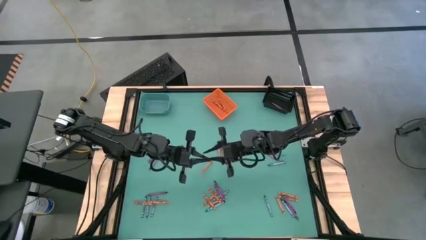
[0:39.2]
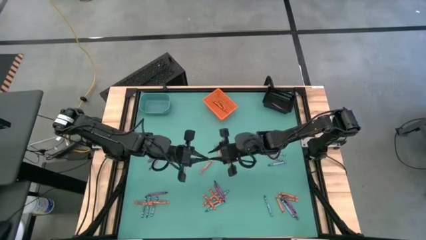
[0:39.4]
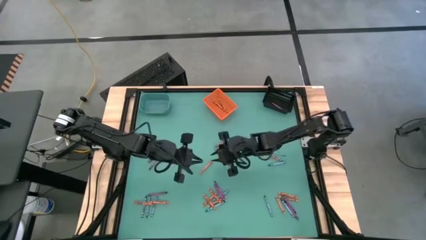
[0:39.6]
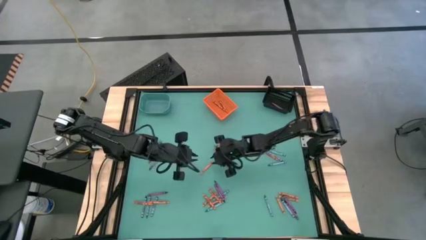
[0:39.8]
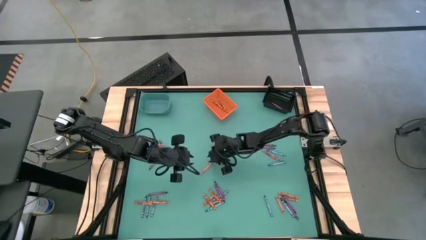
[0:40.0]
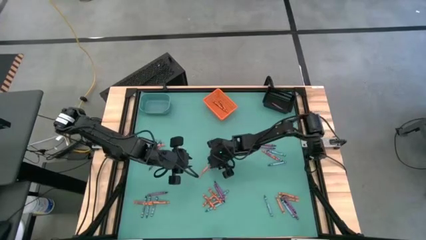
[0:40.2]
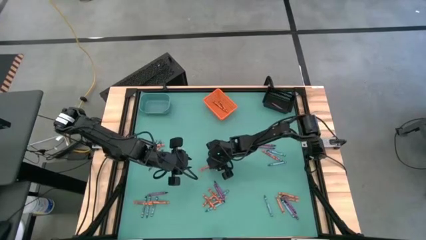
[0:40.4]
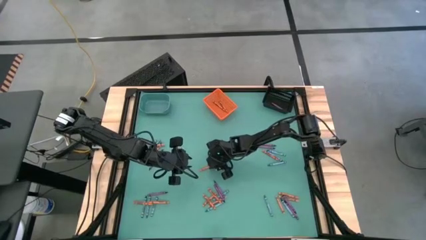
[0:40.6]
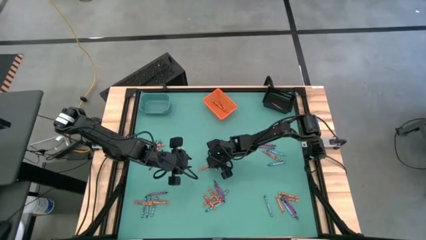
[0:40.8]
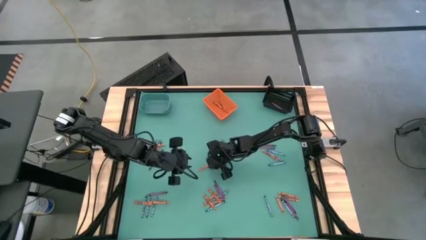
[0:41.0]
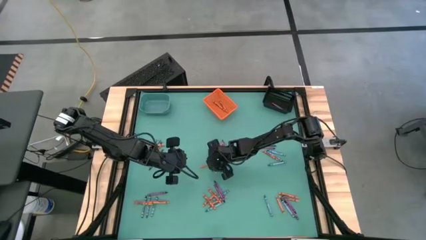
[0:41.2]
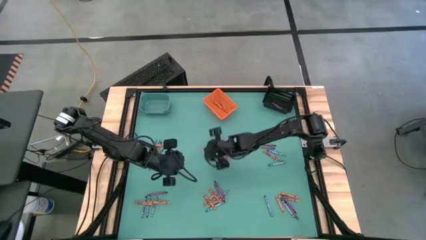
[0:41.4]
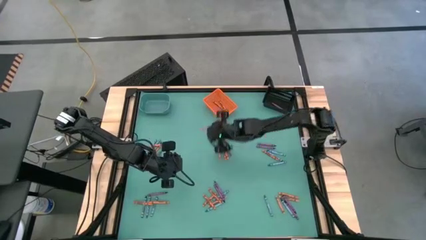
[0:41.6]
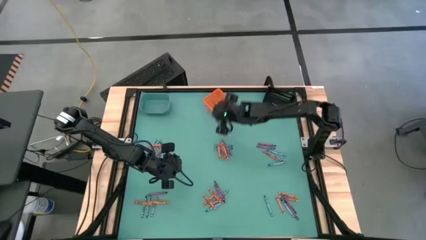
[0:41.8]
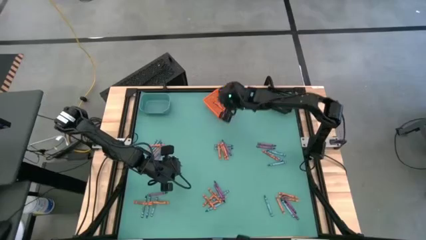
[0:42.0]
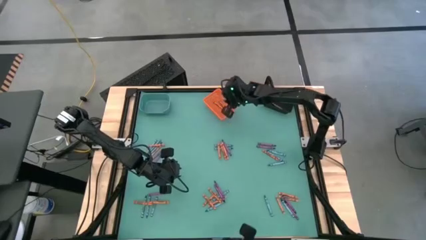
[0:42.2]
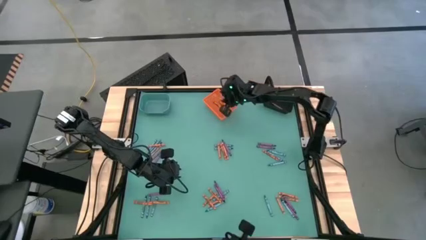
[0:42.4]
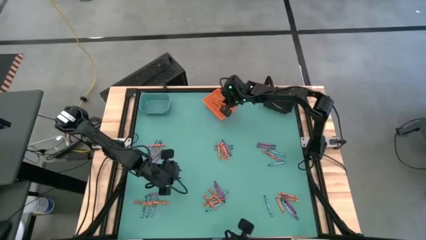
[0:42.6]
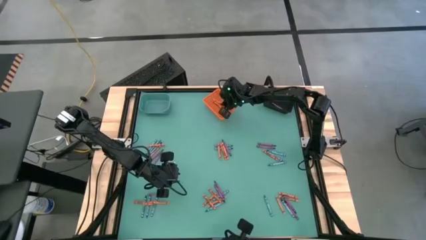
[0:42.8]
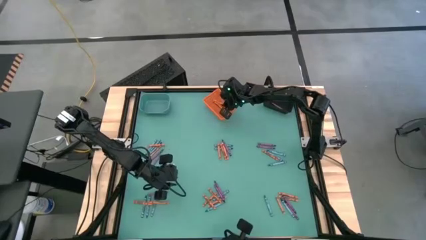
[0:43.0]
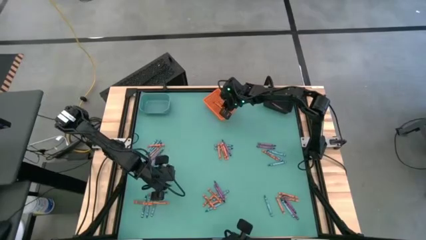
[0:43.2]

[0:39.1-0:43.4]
Task: Sort crayons
Put the crayon into the orange bin

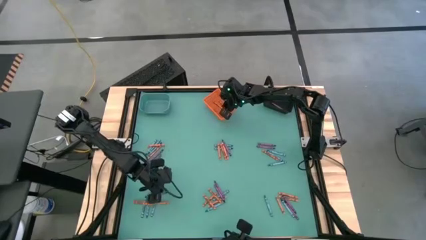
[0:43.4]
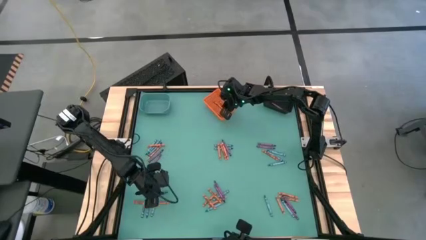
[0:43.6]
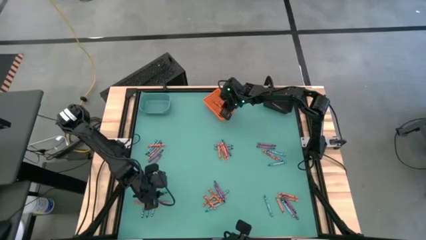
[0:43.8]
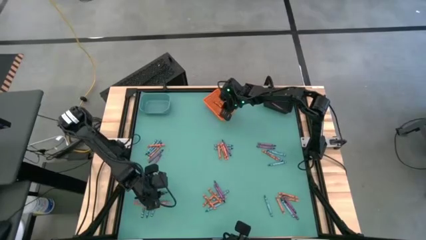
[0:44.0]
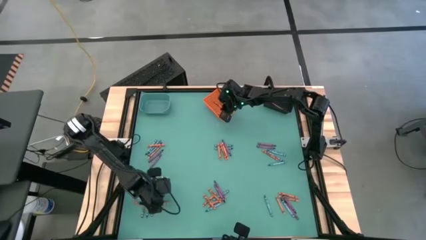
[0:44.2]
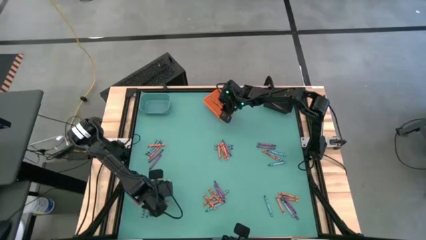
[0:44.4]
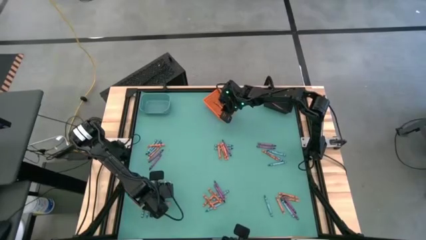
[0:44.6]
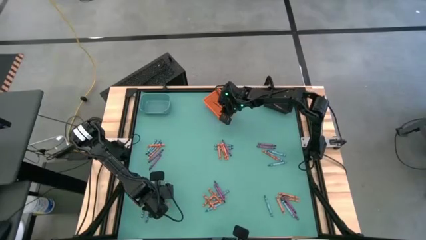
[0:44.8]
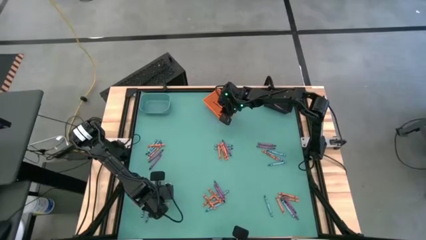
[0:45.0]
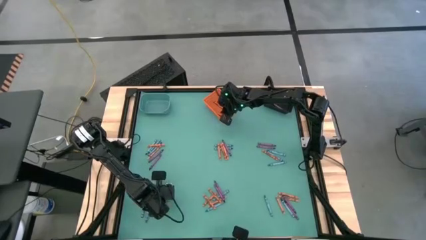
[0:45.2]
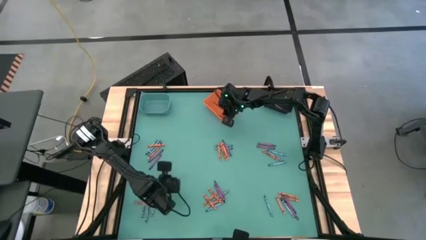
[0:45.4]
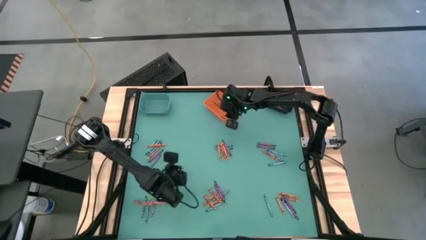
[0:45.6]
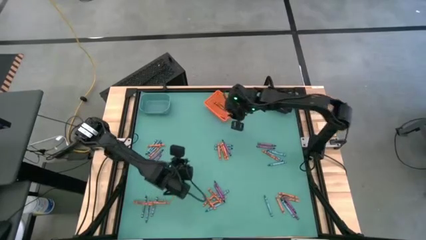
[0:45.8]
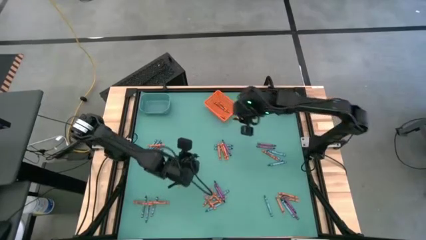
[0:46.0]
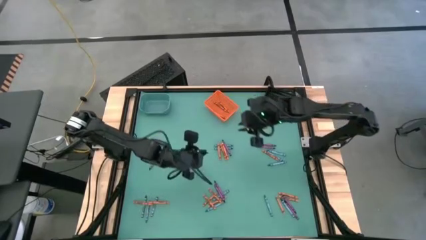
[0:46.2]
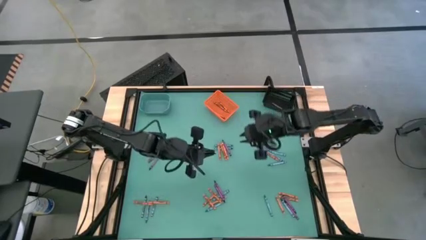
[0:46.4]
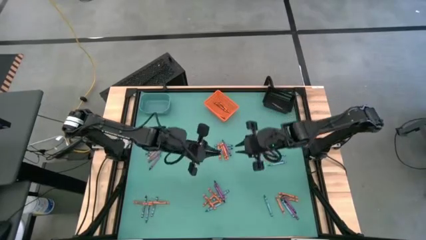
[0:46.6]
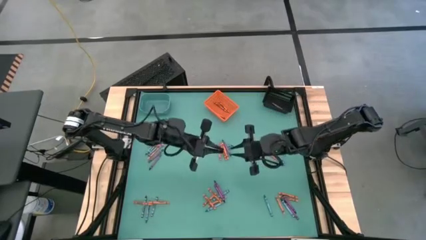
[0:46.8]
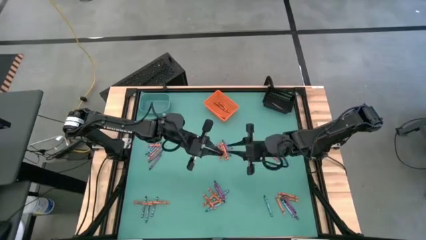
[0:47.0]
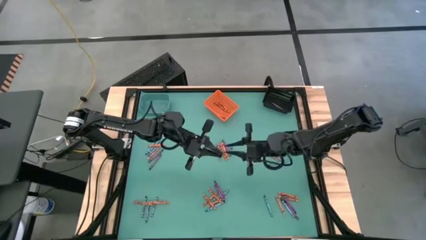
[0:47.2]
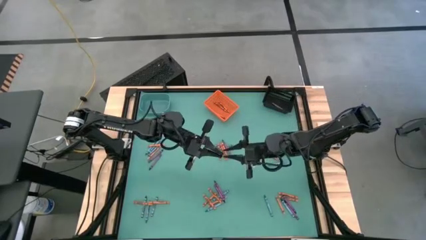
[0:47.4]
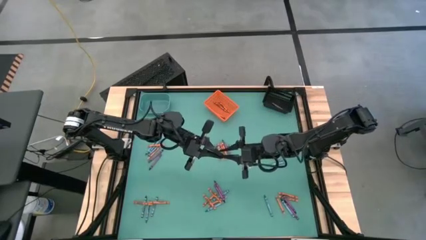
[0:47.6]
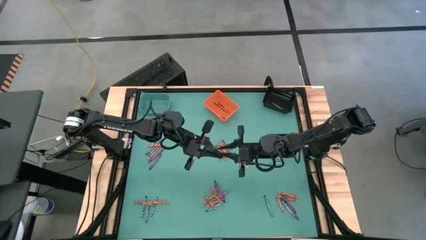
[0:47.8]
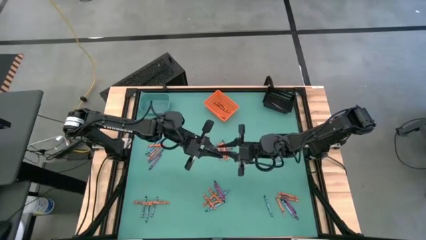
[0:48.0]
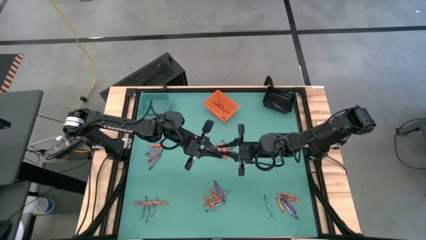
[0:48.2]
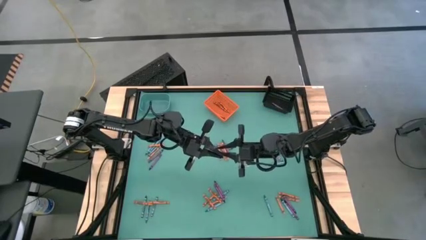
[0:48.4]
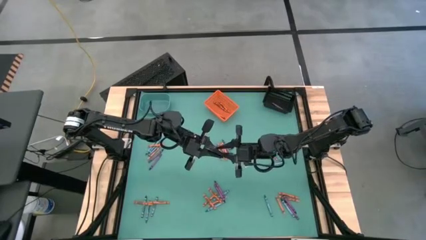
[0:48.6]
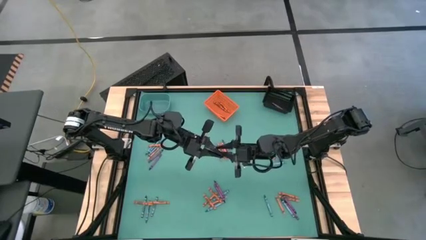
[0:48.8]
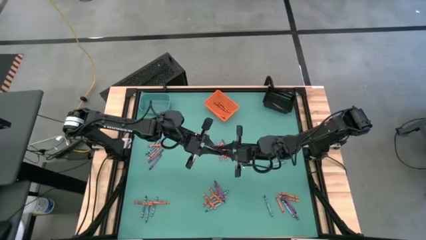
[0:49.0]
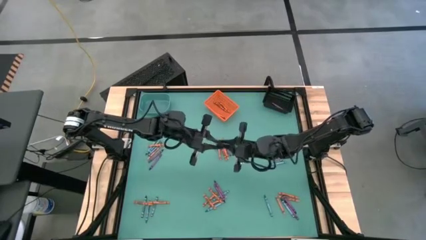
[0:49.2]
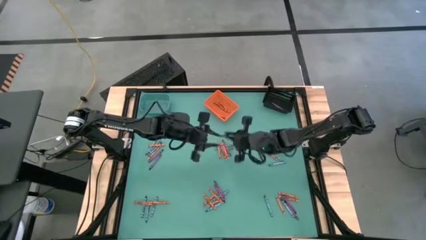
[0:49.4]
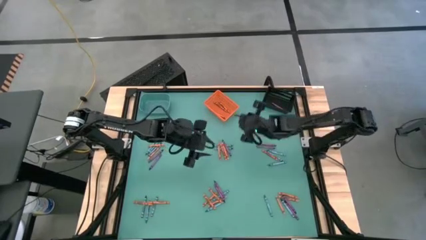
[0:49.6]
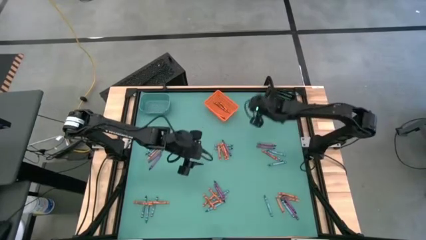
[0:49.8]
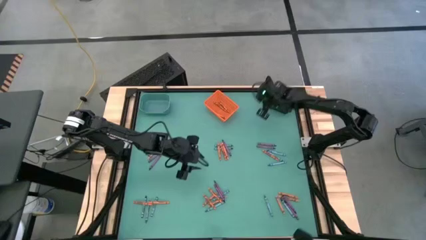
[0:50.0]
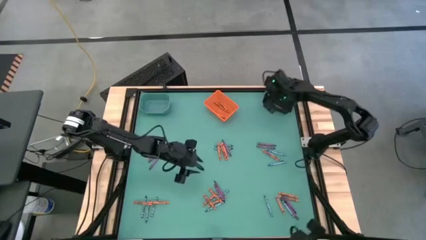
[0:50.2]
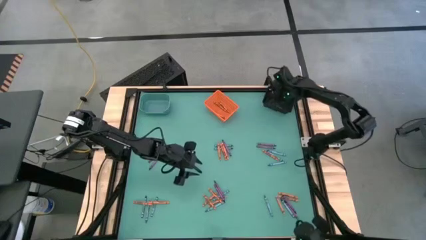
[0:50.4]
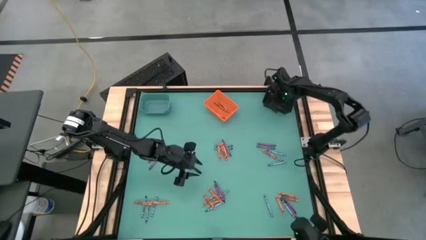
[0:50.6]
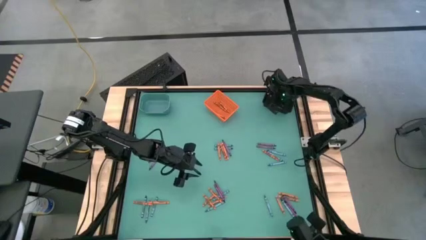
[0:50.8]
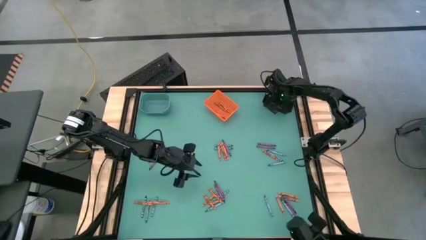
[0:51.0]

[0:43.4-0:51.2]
Put the violet crayon into the black bin

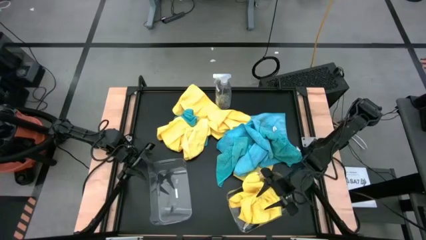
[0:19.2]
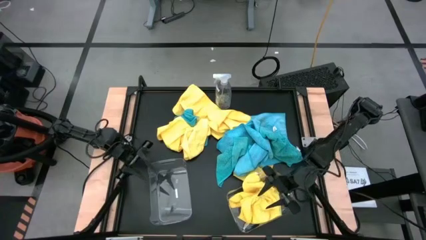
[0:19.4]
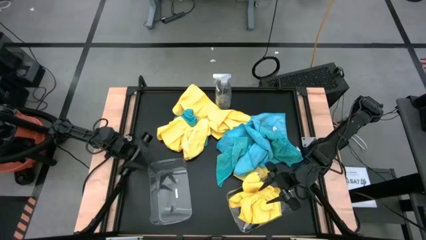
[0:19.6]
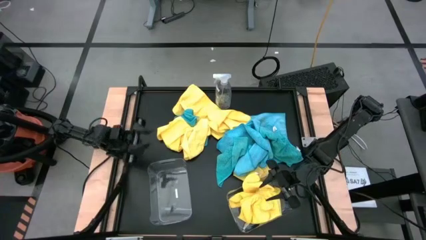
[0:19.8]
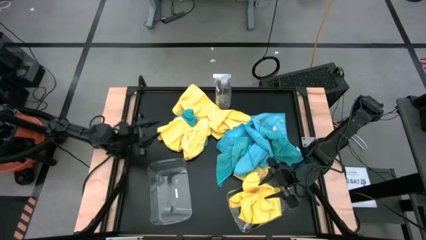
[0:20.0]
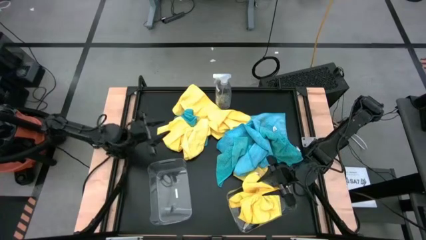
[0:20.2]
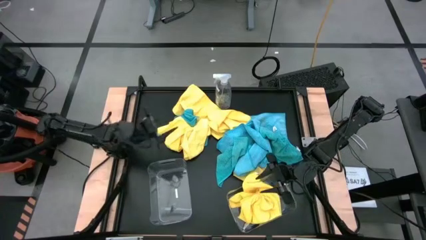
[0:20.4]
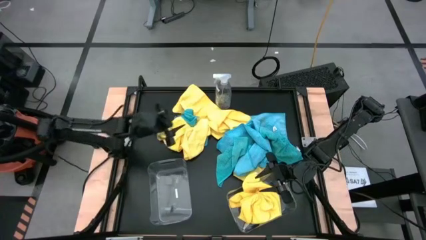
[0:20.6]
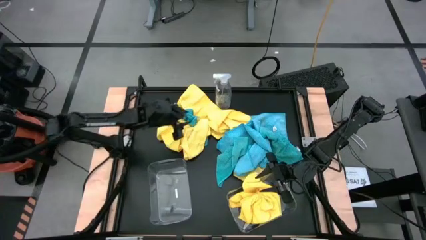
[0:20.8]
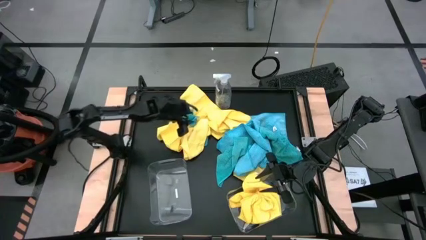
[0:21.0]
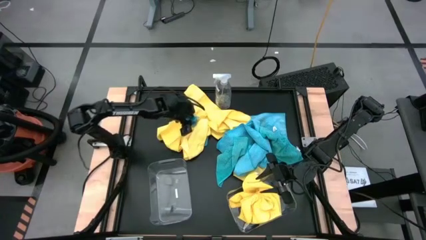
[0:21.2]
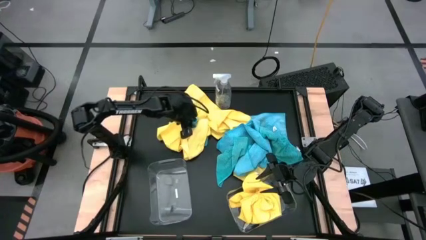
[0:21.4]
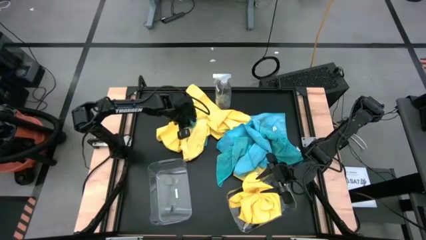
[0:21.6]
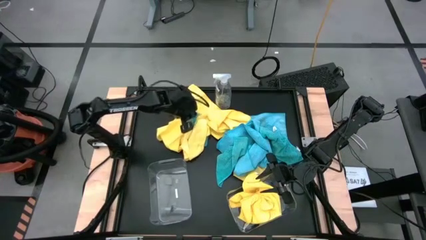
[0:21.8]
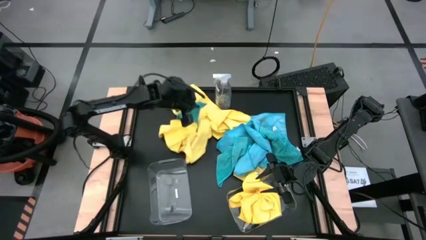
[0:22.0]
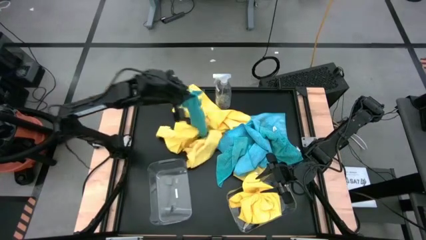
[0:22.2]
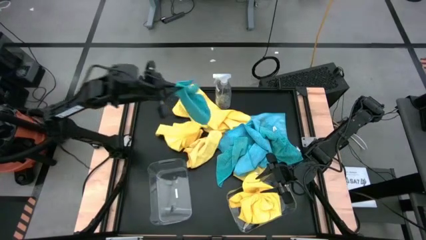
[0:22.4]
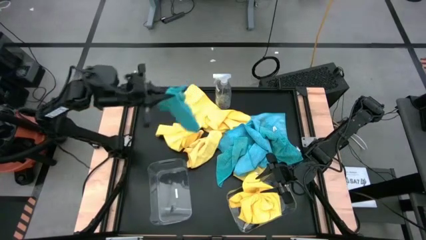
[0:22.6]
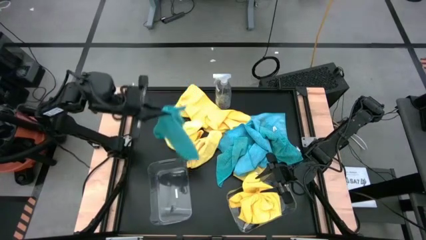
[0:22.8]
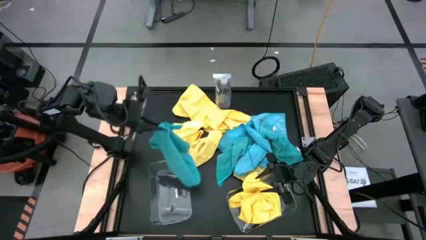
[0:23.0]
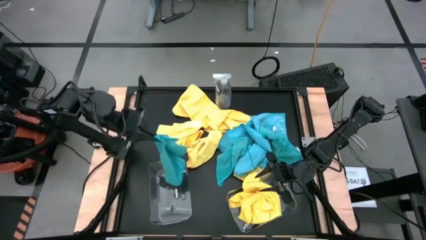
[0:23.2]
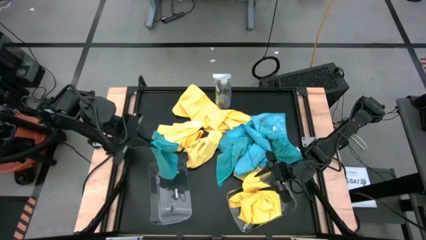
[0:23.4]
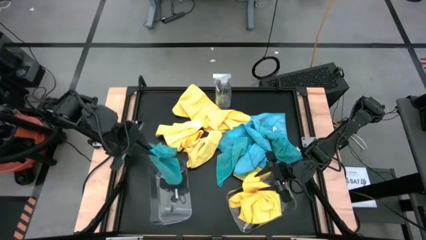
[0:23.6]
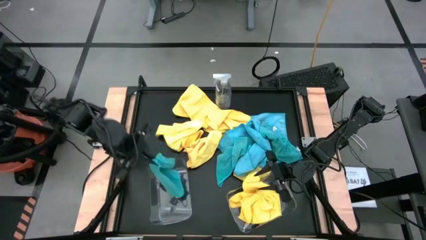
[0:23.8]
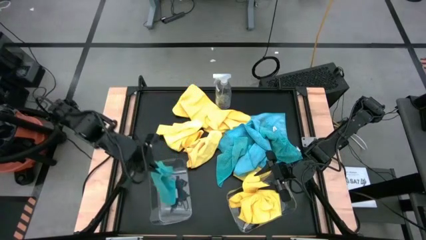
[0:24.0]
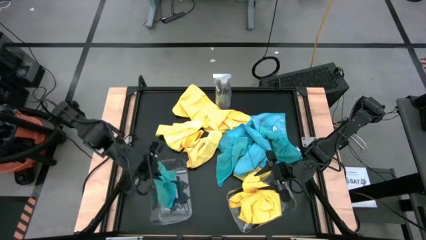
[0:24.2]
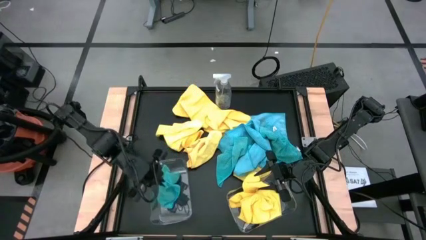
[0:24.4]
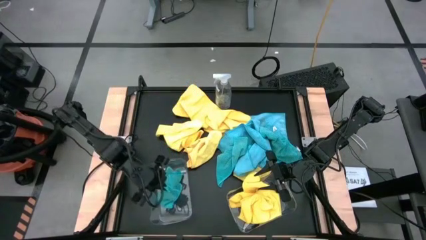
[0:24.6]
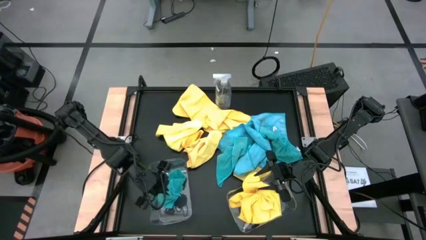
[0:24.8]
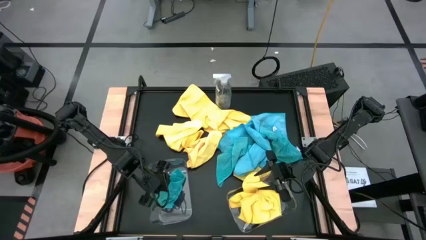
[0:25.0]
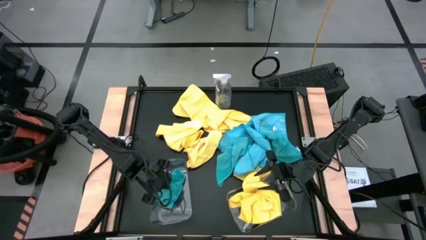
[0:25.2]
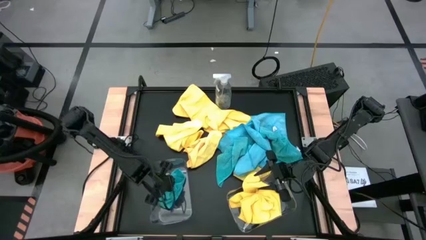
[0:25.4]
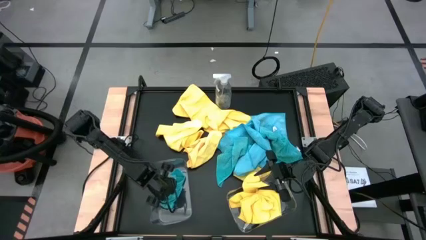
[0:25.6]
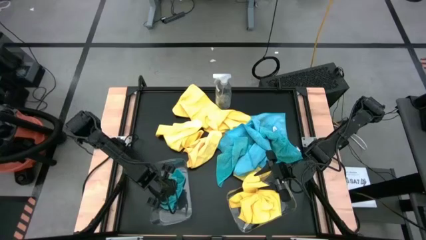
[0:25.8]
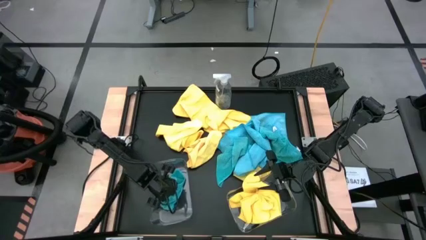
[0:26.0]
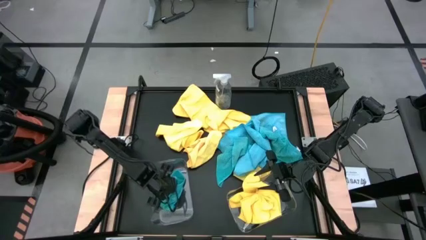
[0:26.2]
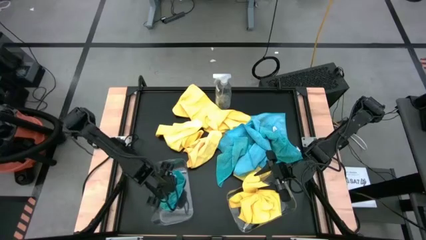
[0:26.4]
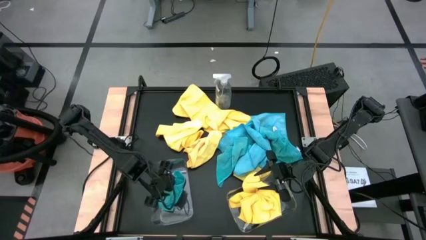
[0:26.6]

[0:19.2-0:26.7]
Task: Sort microfiber towel by color & place in baskets
Put the blue microfiber towel into the left transparent bin
